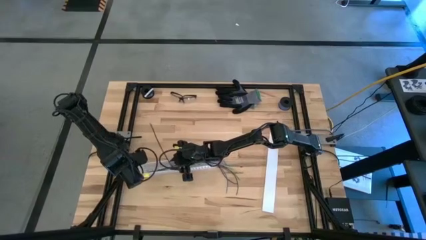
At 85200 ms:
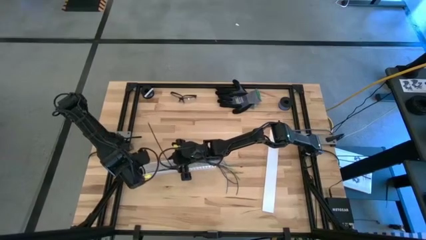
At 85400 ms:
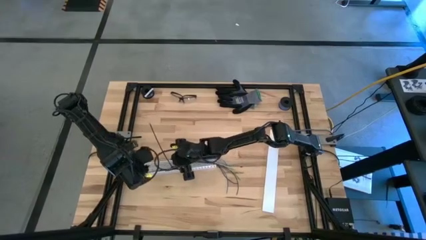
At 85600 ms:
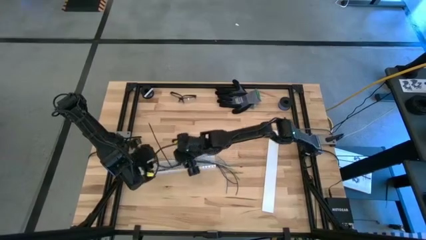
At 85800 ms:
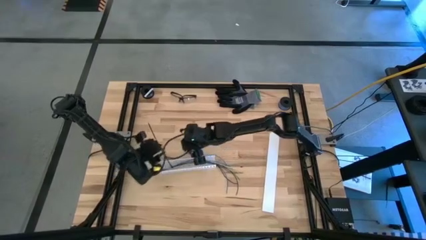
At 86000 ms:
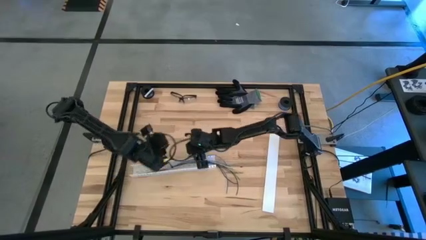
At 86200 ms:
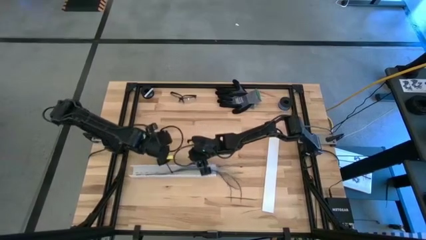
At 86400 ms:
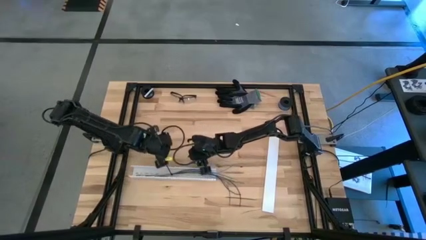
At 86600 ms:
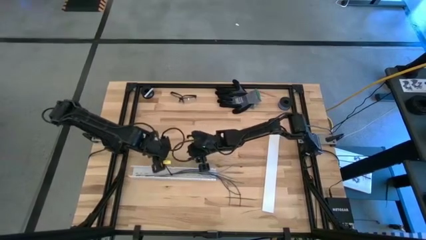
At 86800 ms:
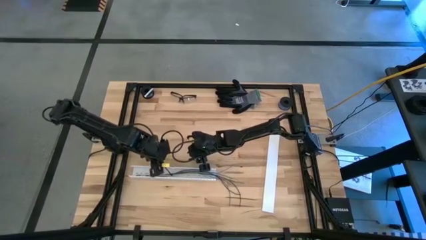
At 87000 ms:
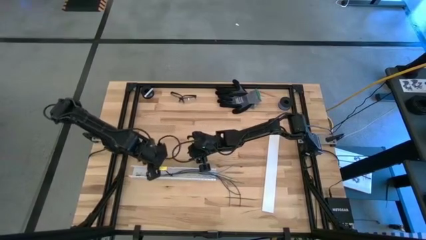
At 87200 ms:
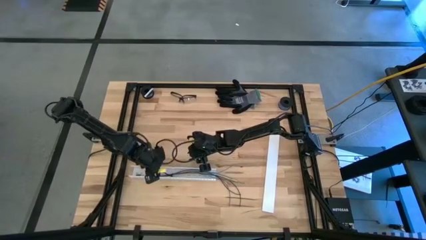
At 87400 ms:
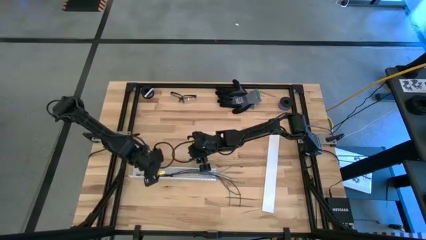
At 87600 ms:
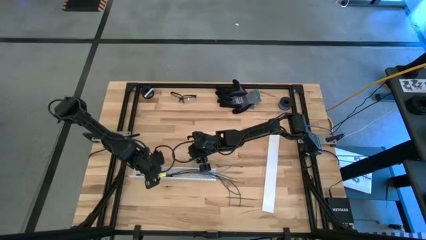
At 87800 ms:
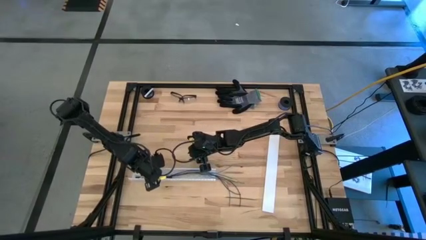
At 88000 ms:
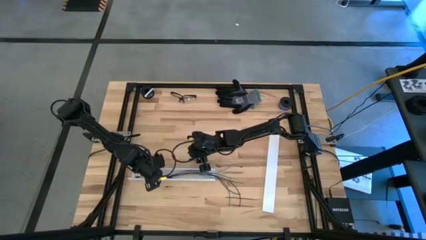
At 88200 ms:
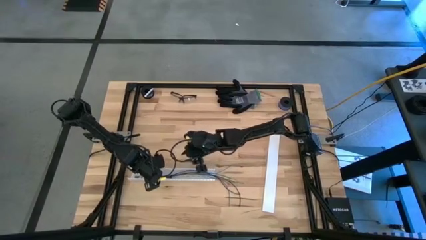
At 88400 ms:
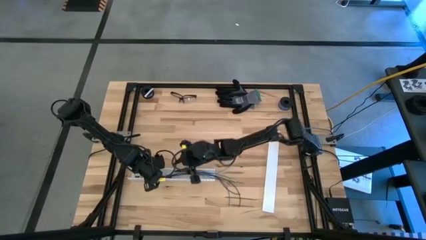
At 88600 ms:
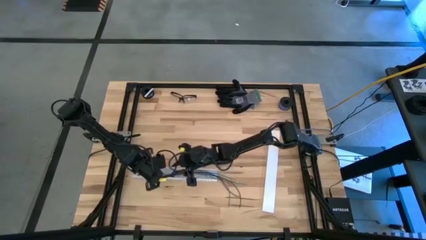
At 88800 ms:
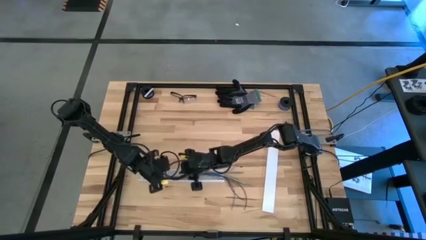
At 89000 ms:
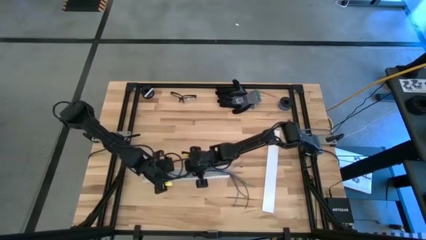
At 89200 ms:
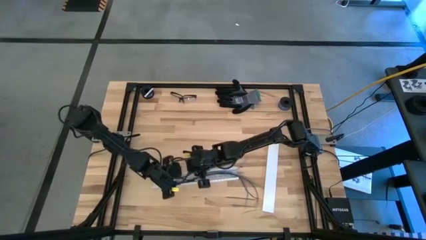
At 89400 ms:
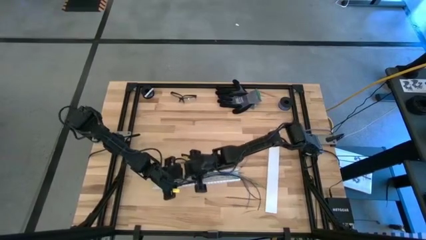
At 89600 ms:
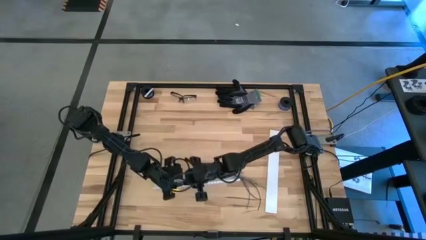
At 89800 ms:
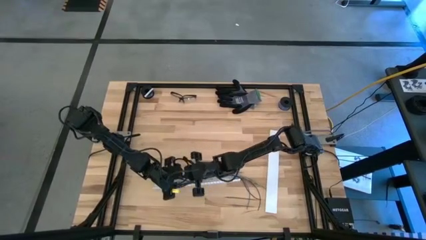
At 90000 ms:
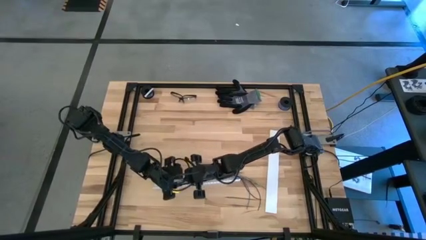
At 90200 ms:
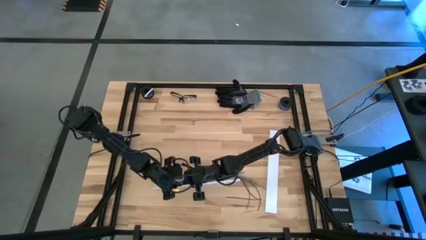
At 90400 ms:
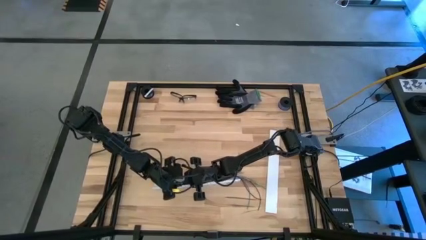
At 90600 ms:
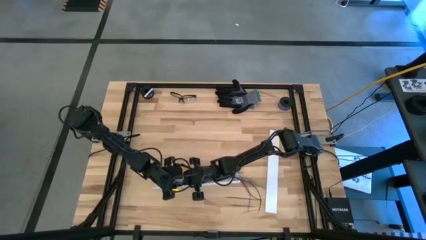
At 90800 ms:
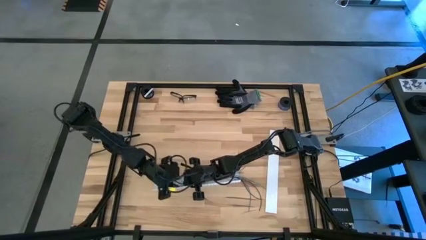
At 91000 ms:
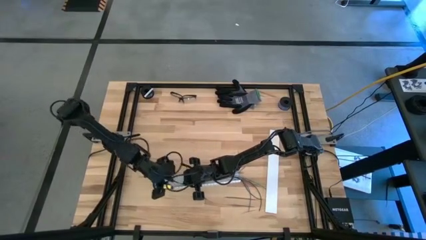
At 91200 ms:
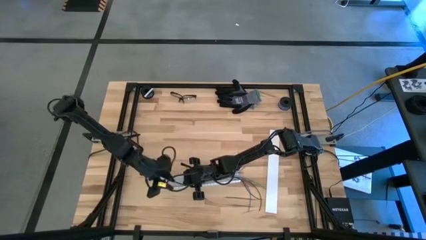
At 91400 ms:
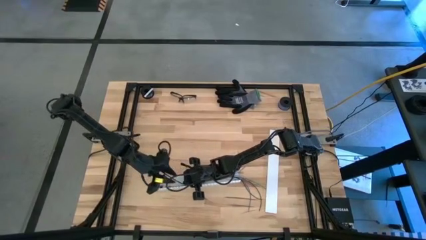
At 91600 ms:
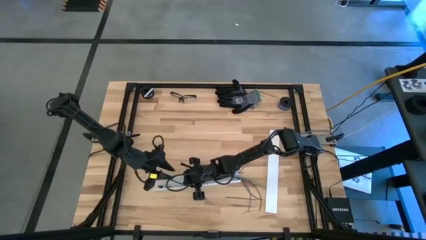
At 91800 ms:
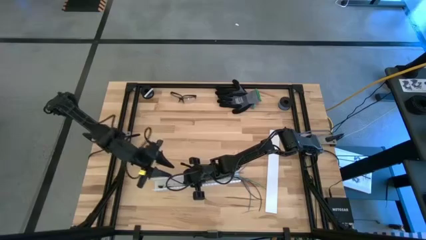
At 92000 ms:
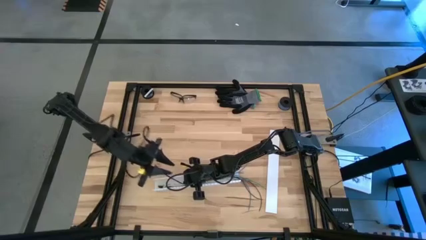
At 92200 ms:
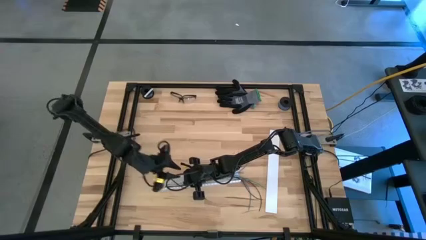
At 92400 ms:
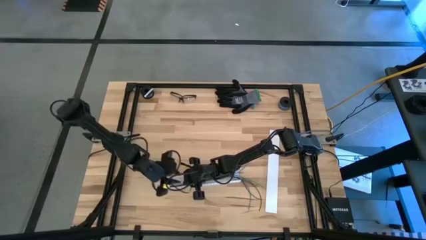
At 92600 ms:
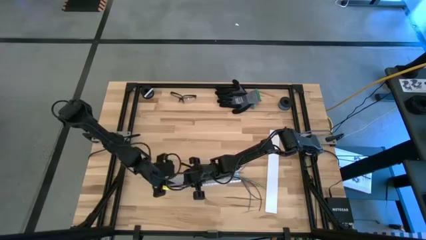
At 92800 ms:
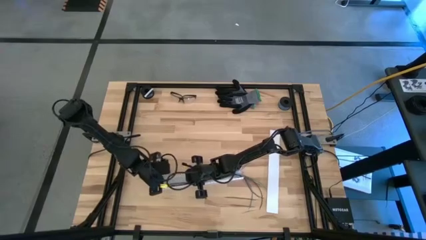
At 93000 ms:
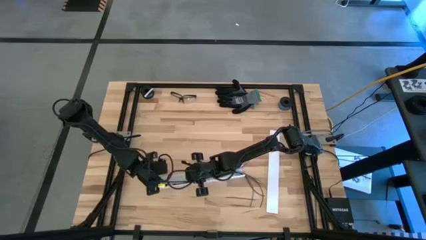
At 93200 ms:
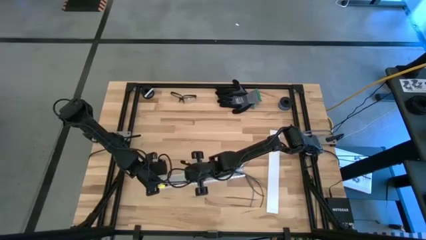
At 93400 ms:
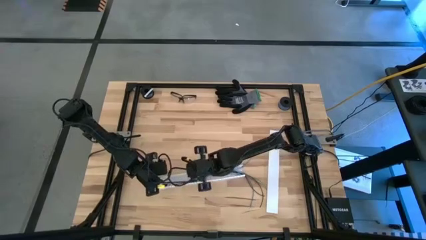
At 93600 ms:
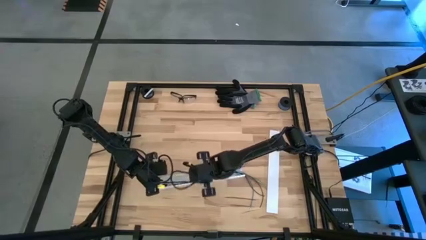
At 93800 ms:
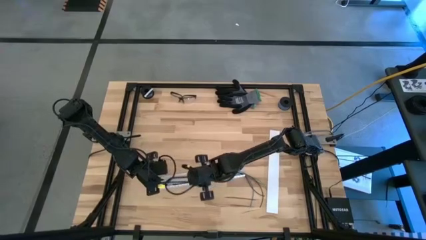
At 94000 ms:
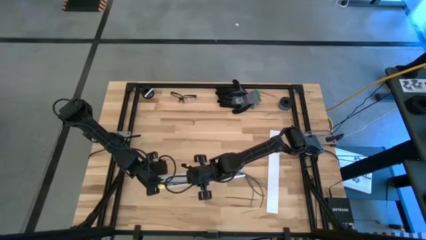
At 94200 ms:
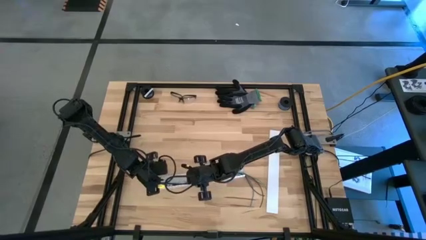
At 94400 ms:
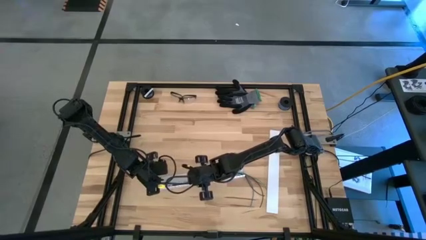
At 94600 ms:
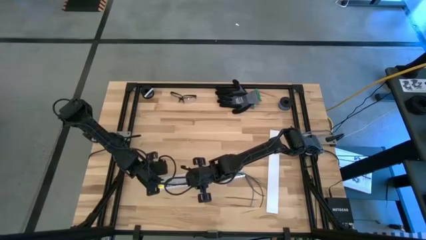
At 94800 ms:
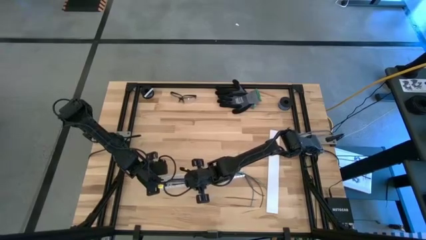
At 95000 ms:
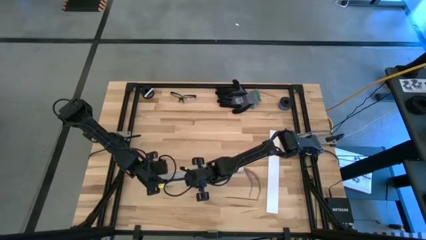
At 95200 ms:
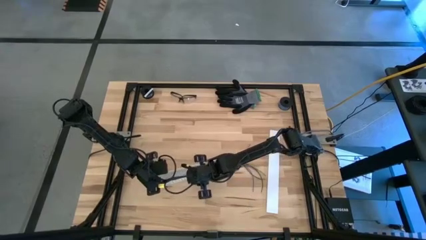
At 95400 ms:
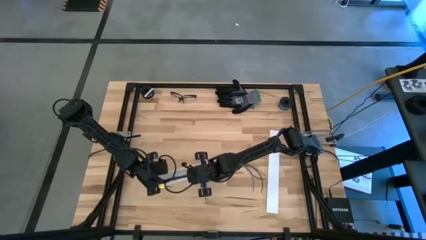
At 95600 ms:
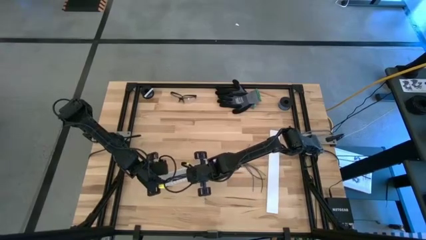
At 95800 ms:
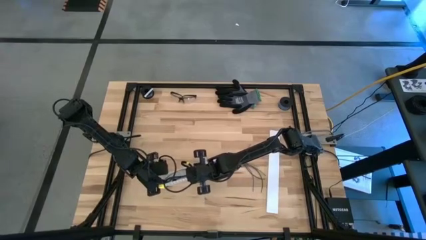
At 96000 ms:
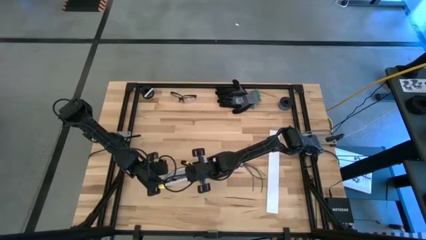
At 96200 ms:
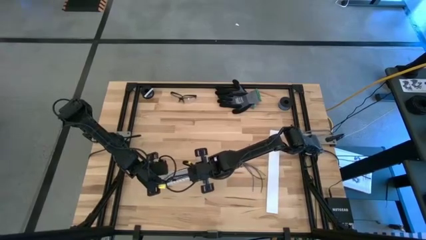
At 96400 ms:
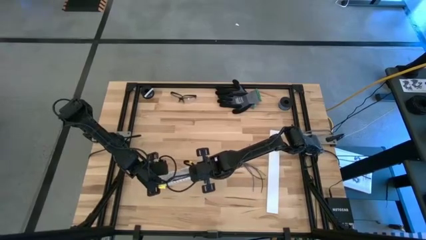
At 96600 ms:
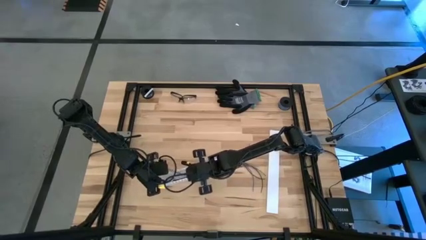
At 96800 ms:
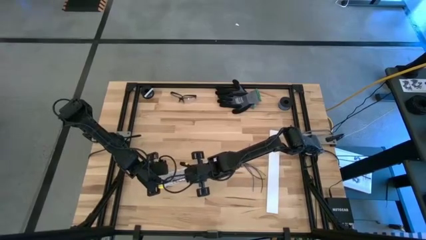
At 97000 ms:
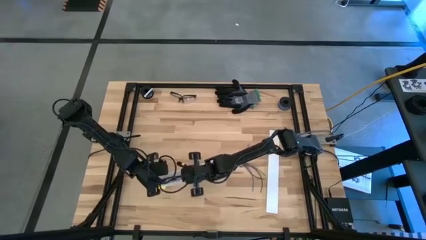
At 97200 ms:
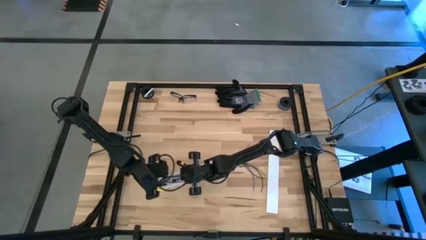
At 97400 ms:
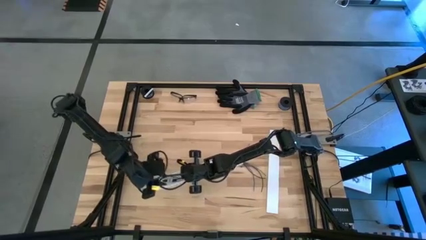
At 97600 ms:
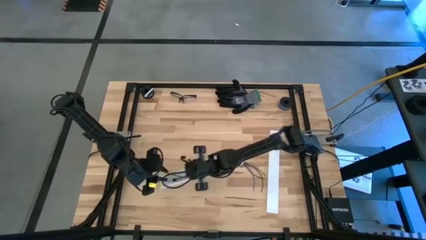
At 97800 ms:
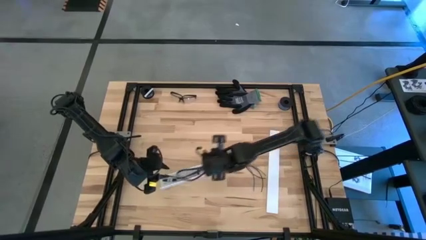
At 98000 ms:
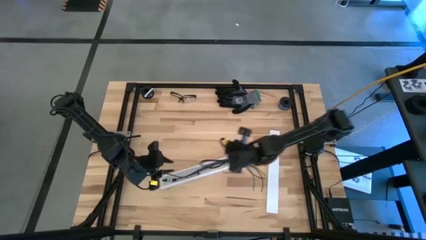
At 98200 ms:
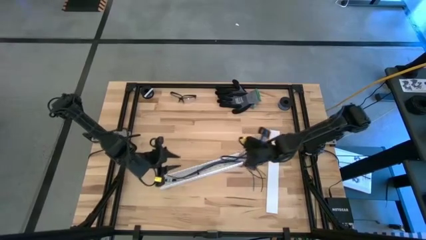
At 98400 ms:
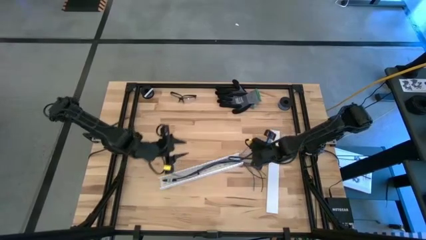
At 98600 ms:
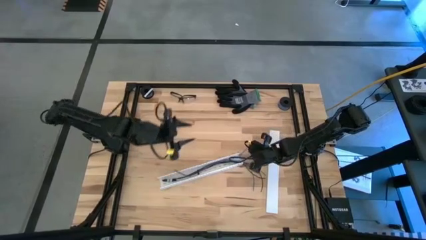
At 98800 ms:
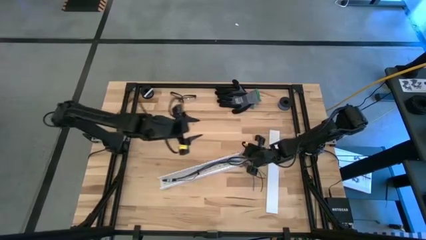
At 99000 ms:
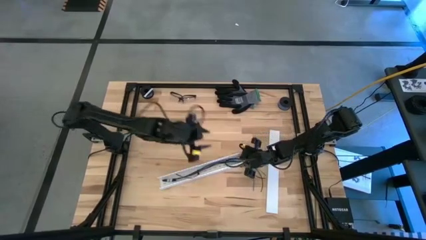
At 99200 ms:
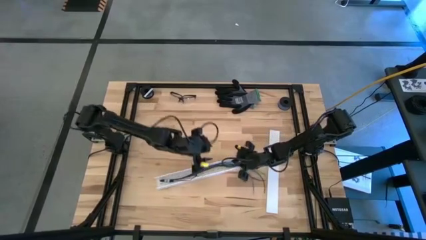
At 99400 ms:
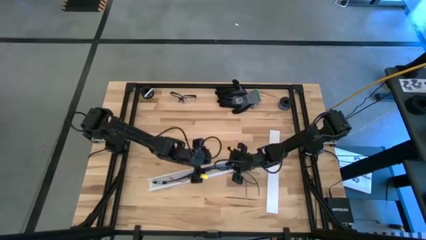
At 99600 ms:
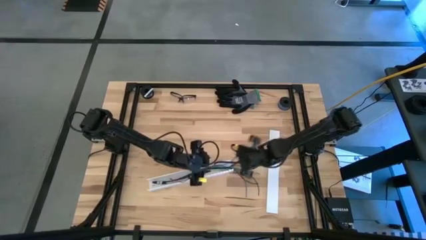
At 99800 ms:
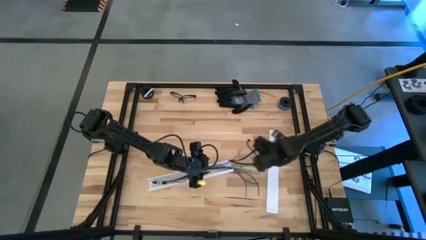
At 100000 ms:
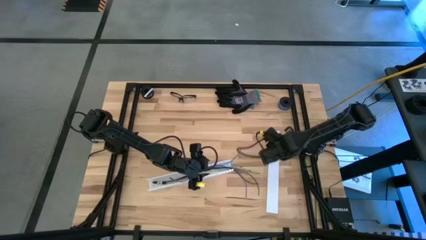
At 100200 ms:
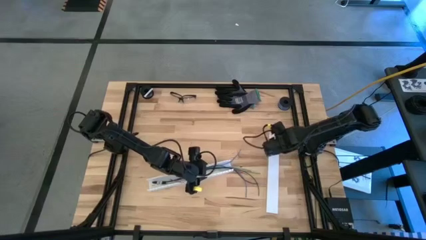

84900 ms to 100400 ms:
Task: Ziptie cables
Adjust the cable duct

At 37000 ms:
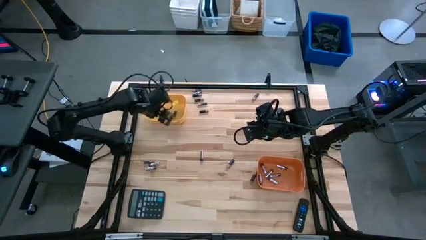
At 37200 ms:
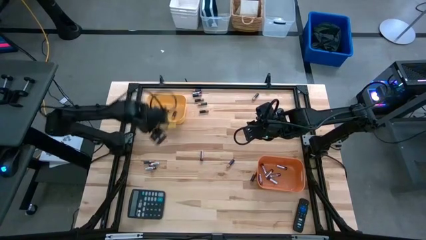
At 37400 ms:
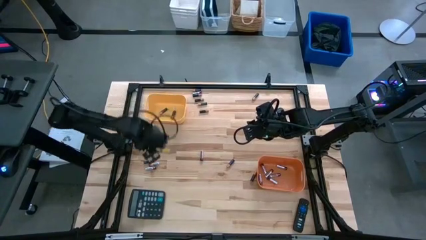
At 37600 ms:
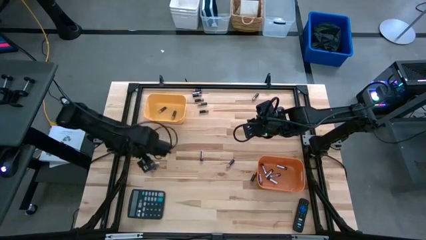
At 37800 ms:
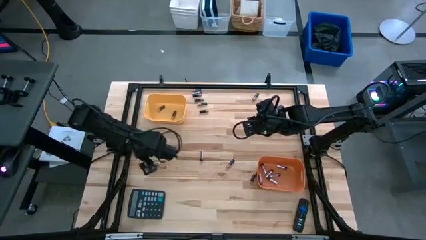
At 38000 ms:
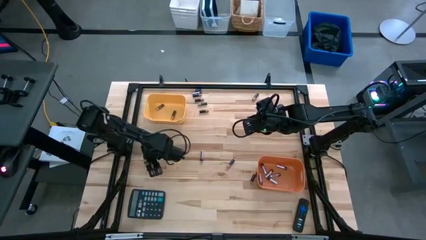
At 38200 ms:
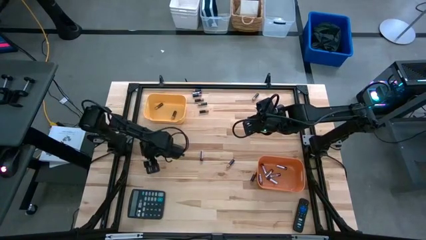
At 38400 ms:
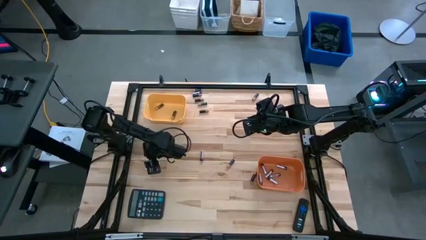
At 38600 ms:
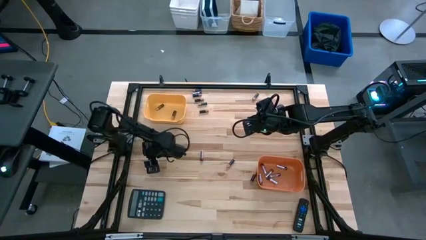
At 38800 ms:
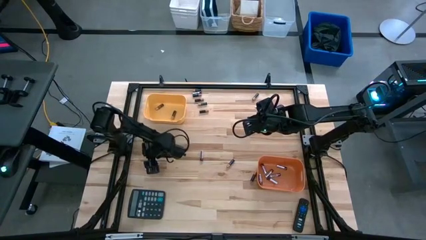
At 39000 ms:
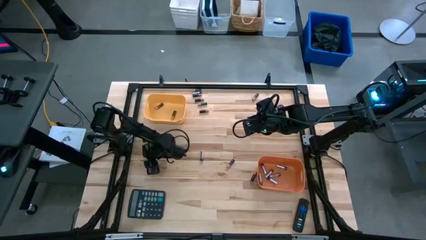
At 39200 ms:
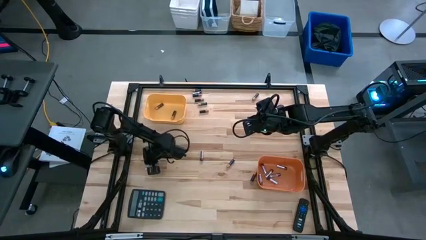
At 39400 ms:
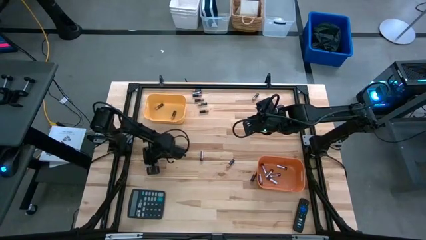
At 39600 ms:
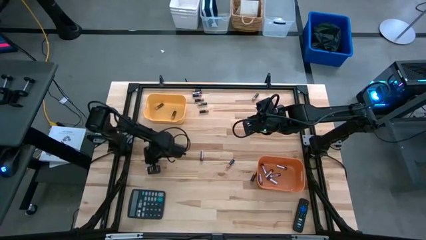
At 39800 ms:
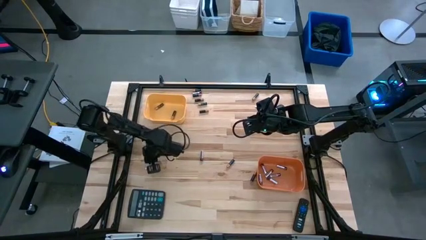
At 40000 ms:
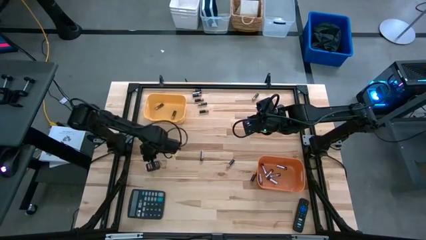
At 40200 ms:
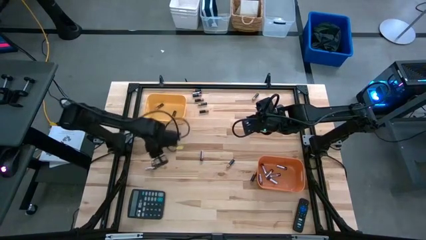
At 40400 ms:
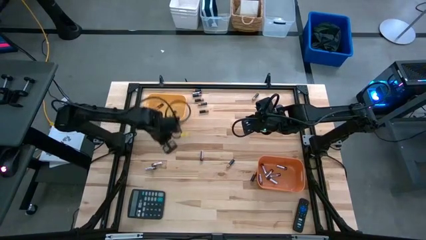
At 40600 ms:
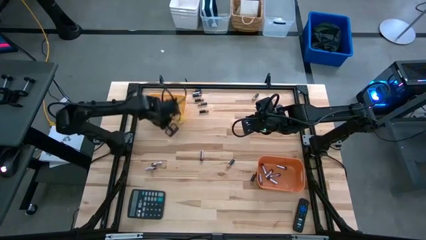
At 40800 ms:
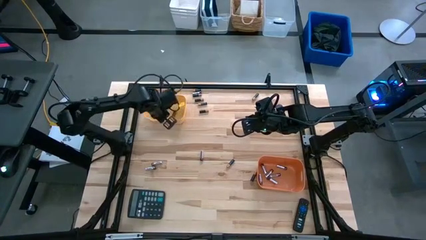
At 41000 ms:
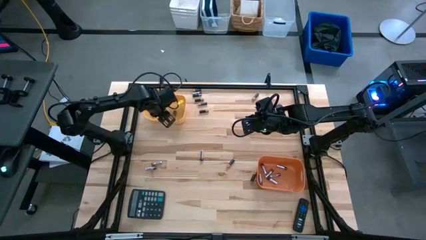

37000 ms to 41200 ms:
Task: Sort batteries
Put the black battery into the yellow bin
